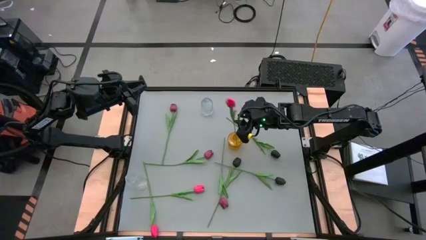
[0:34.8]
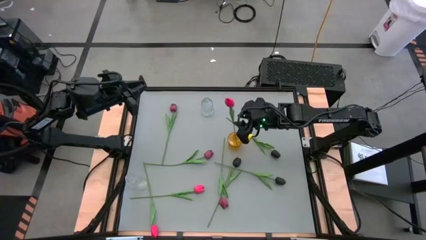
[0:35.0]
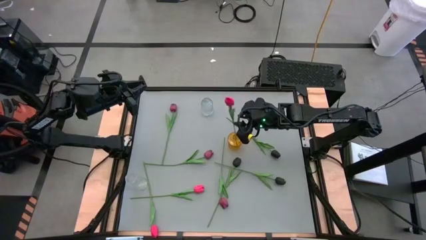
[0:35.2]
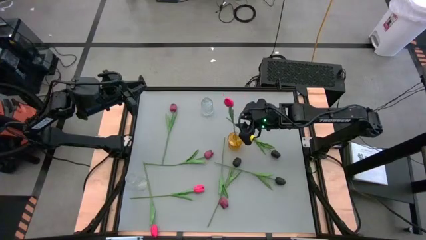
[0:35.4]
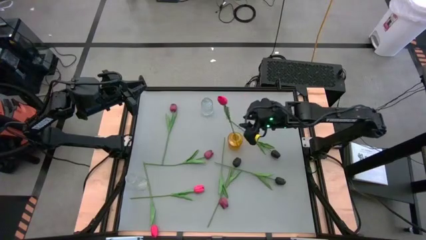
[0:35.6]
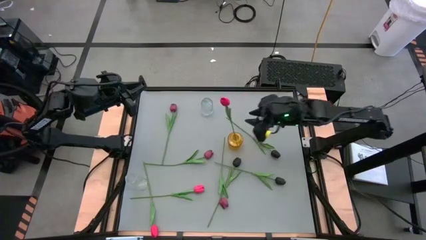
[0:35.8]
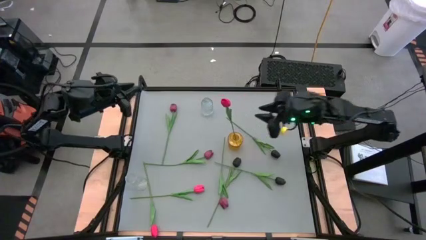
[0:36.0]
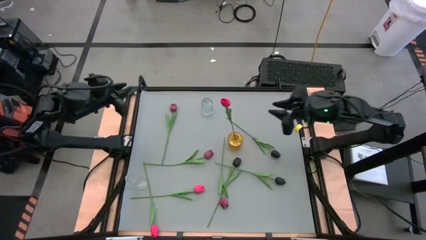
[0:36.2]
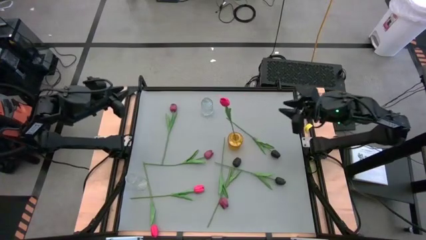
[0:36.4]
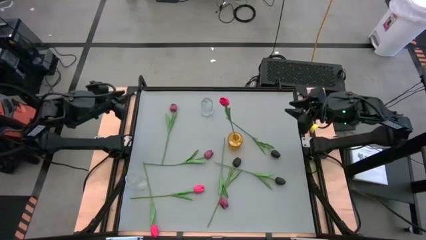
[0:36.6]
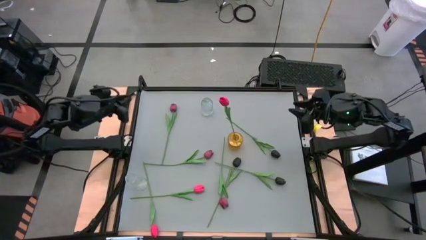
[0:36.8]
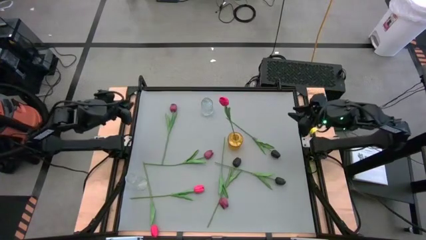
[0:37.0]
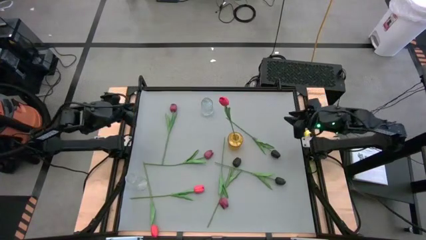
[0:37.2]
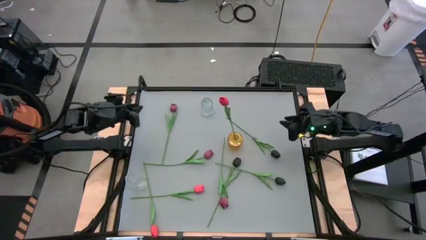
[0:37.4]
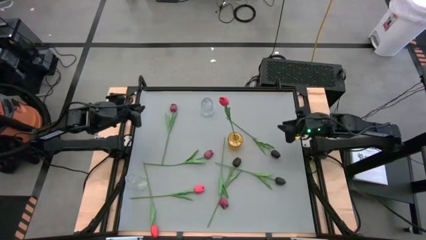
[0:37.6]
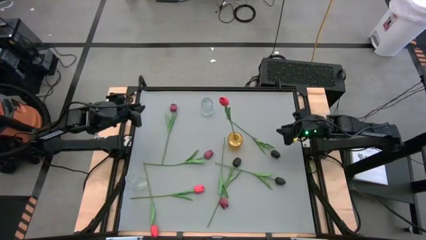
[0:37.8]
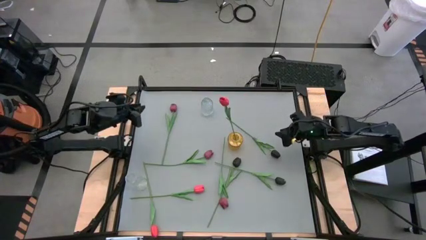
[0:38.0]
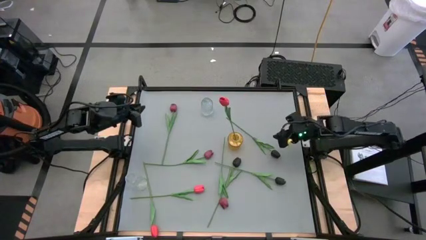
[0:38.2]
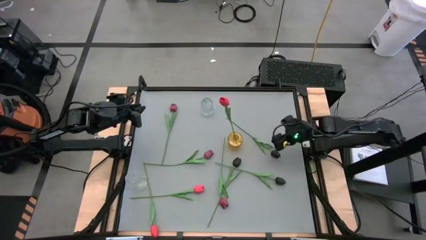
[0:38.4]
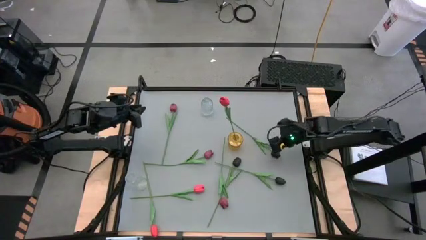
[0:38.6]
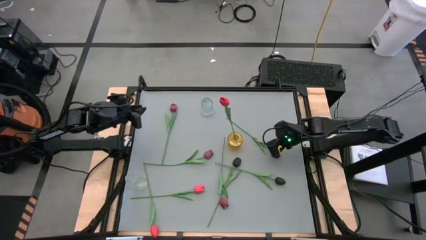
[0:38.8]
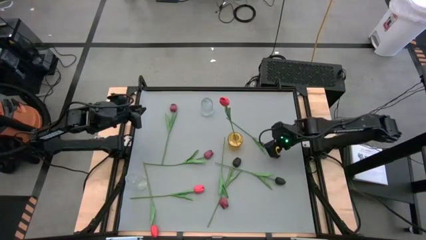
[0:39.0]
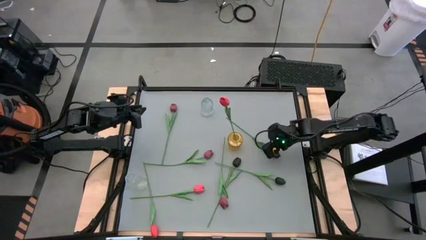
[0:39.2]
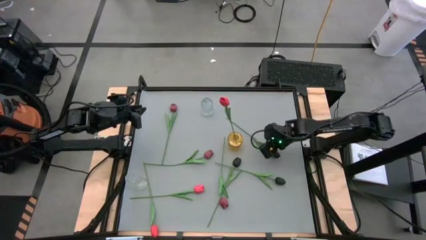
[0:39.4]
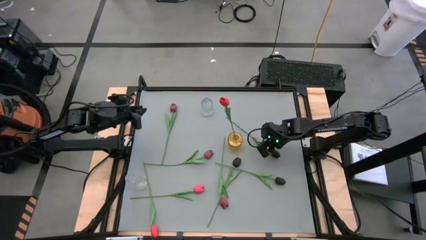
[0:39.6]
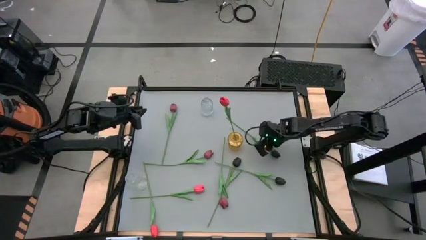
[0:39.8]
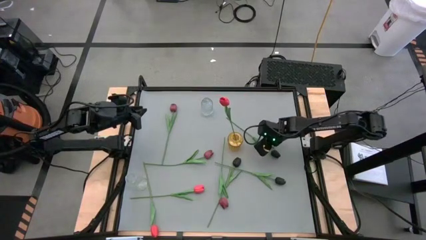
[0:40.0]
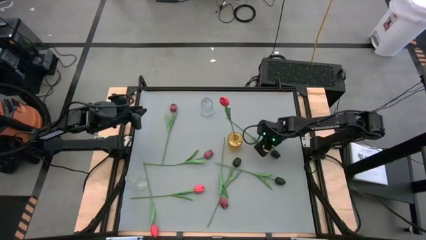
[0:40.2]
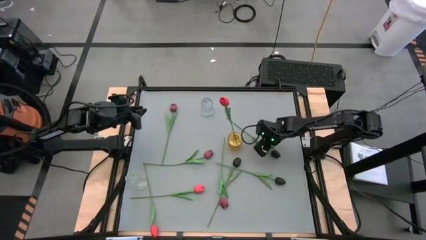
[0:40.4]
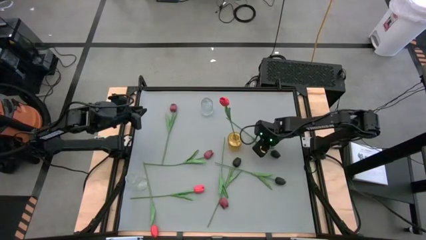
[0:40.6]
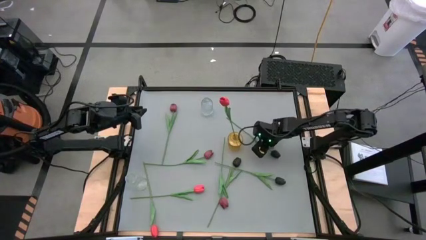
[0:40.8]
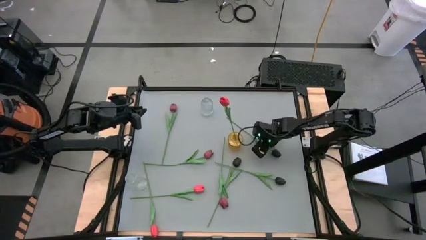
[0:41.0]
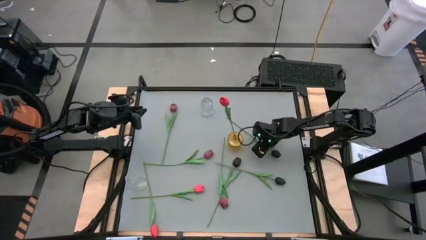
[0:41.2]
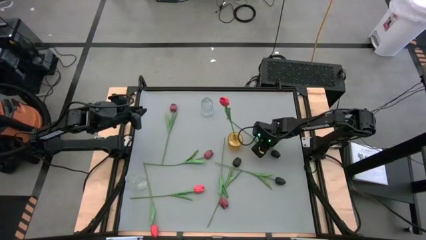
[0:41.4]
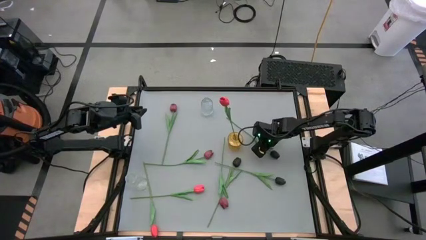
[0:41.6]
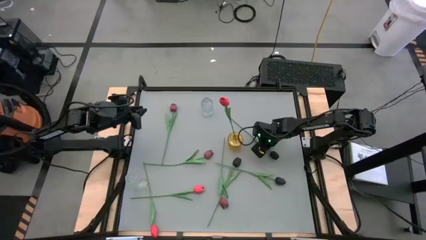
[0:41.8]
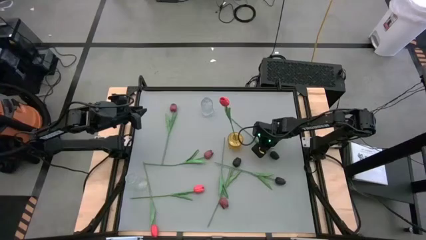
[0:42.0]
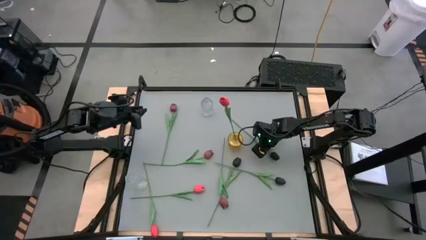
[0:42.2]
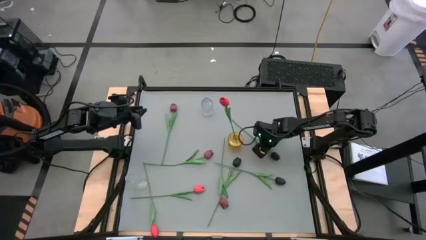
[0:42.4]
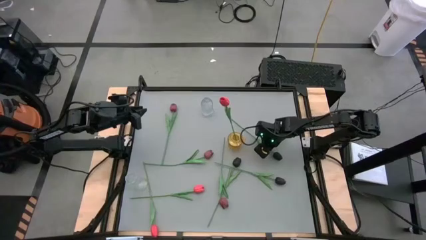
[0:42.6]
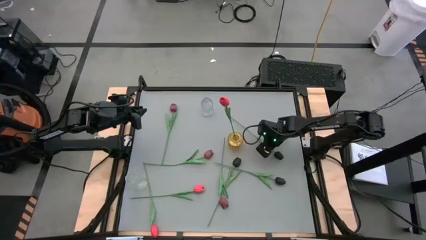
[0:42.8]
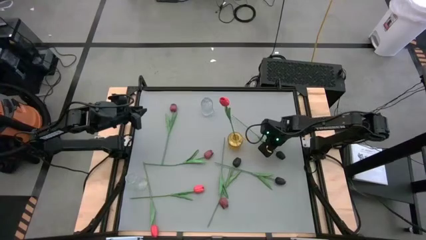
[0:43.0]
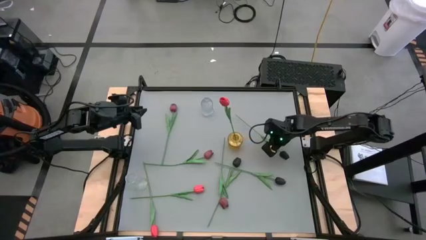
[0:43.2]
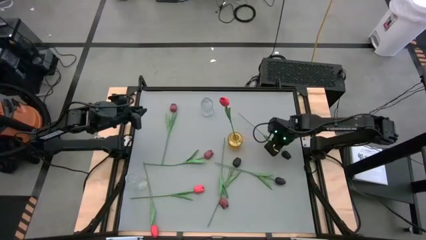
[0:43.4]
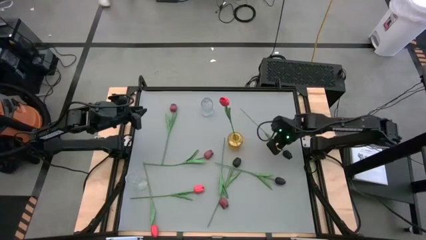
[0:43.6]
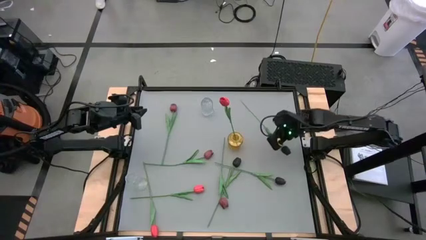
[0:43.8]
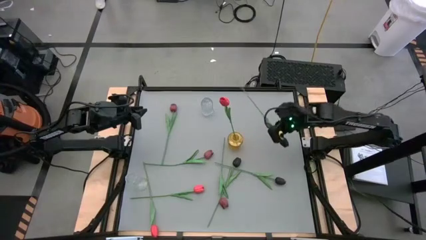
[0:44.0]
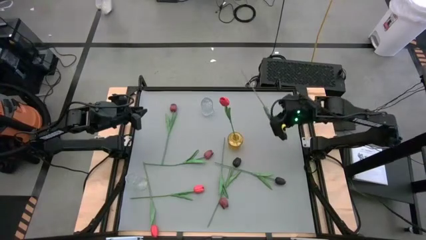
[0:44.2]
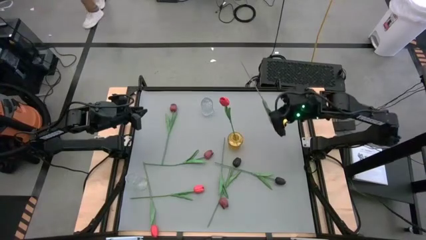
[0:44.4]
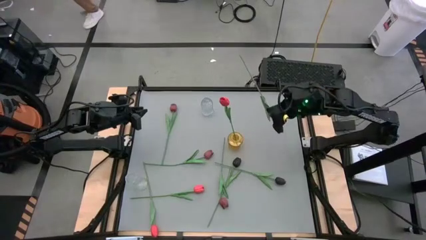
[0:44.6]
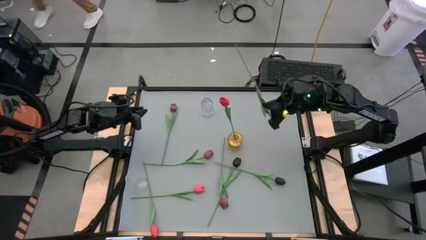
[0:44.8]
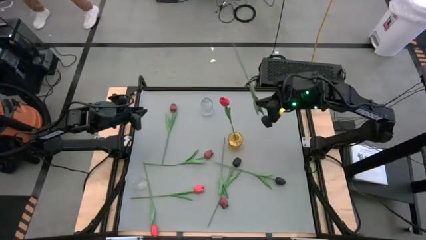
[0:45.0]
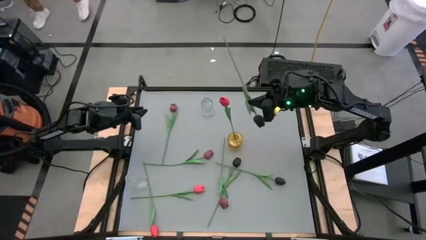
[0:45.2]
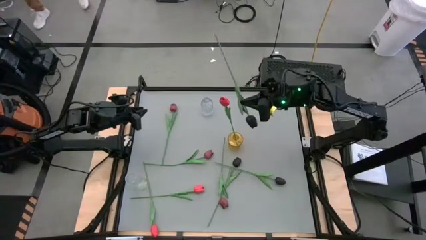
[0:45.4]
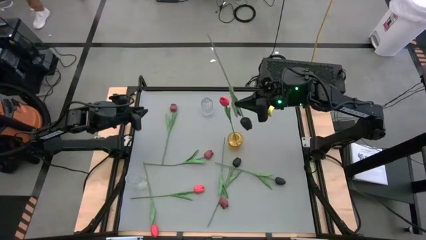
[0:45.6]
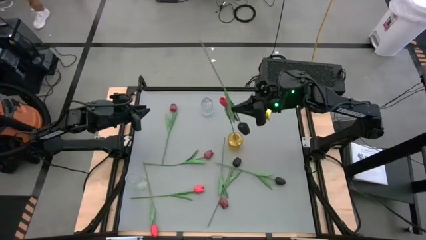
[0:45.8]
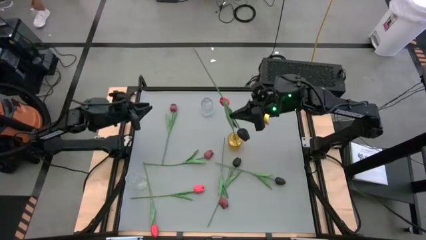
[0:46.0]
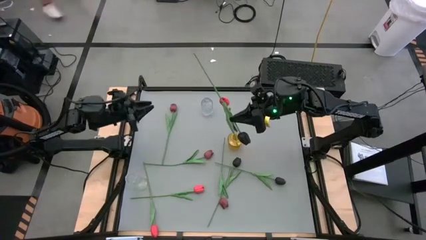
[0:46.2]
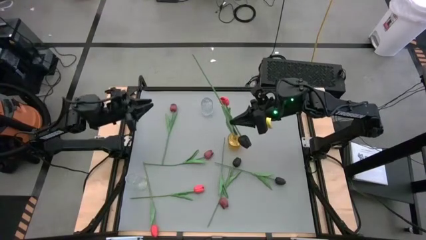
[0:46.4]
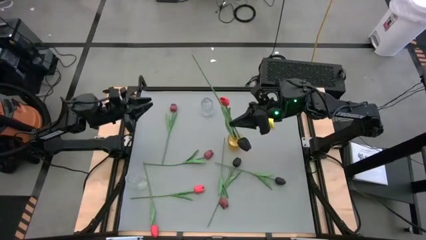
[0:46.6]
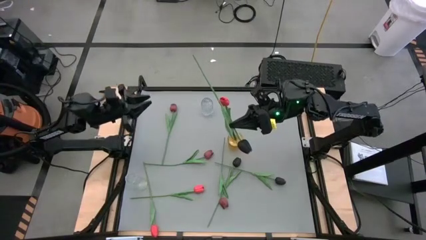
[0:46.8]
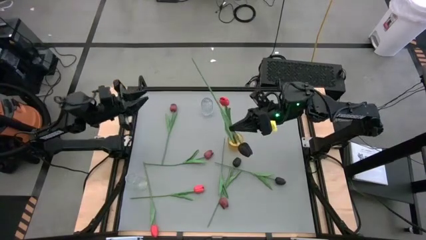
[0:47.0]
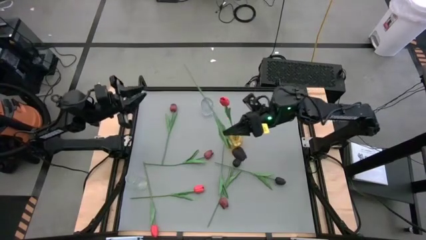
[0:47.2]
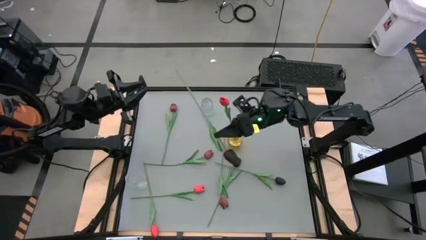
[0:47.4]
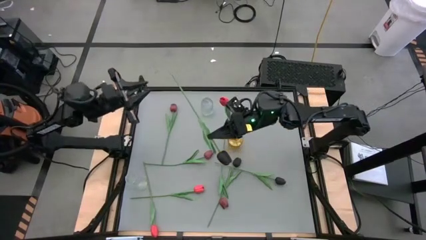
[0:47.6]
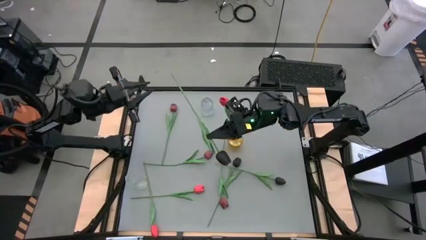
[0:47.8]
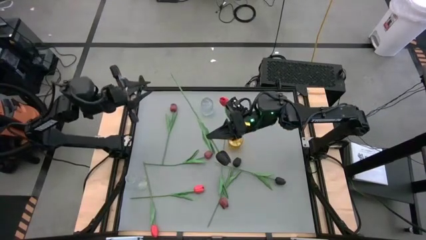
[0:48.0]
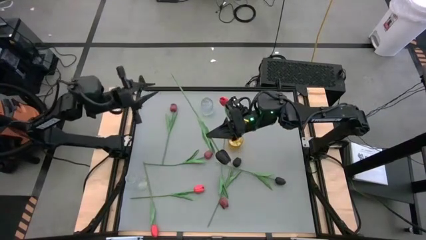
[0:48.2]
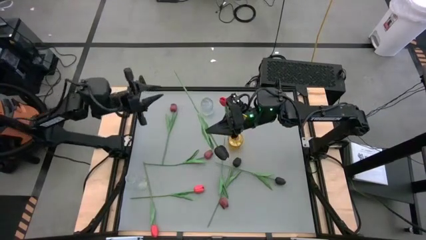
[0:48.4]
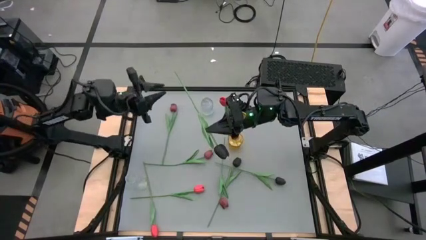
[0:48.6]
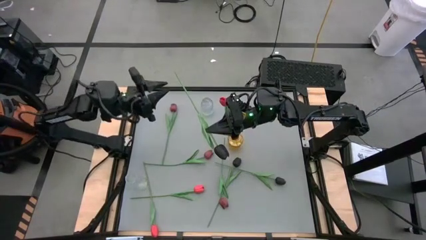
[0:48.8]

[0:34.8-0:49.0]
Task: Sort flowers into vase by color
Put the top black tulip into the top transparent vase

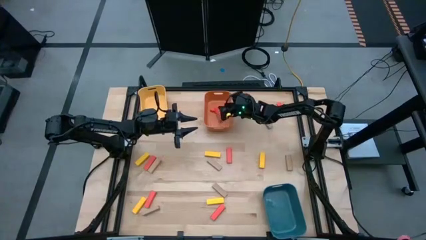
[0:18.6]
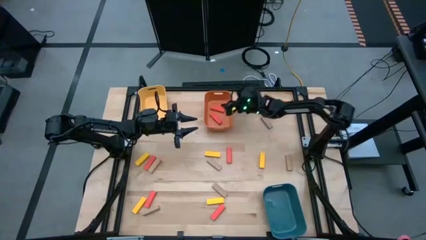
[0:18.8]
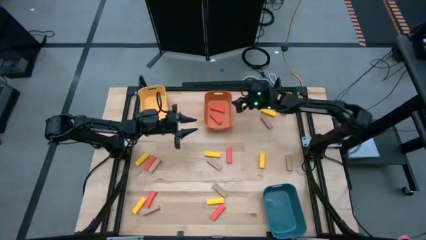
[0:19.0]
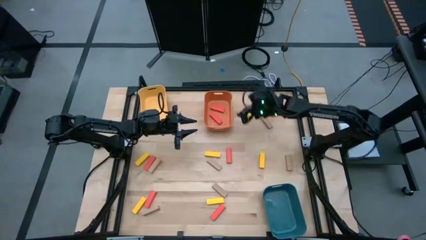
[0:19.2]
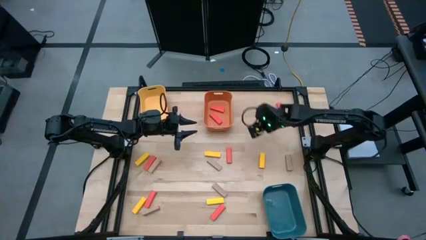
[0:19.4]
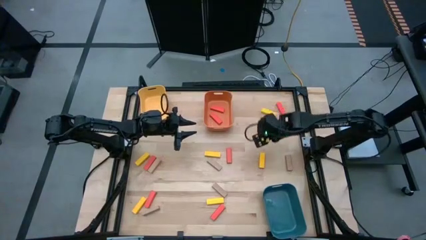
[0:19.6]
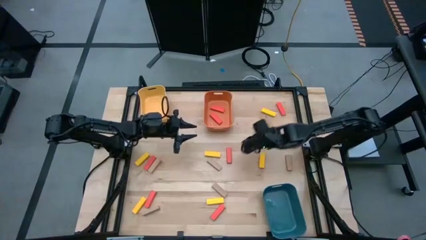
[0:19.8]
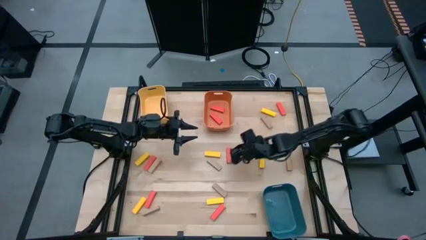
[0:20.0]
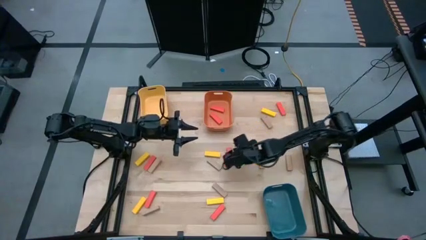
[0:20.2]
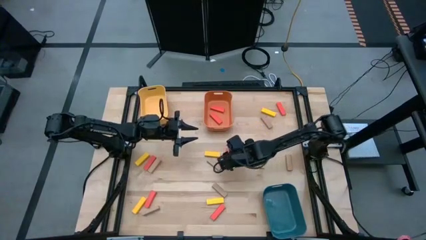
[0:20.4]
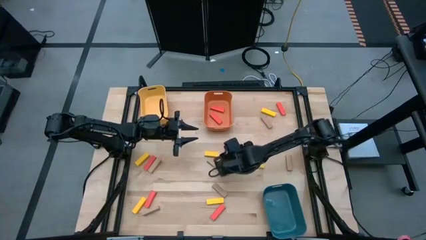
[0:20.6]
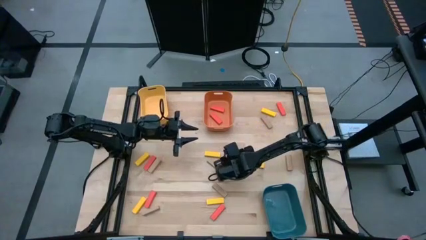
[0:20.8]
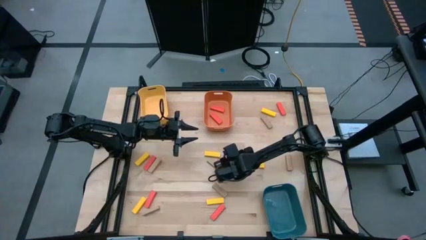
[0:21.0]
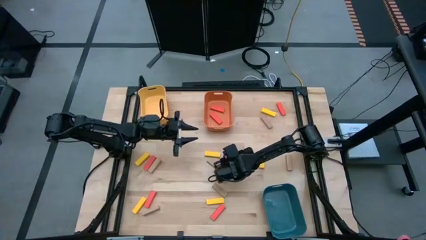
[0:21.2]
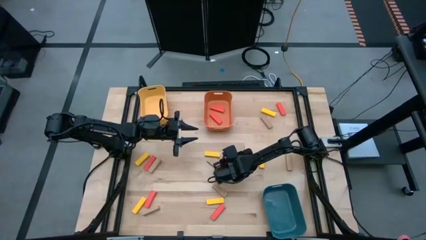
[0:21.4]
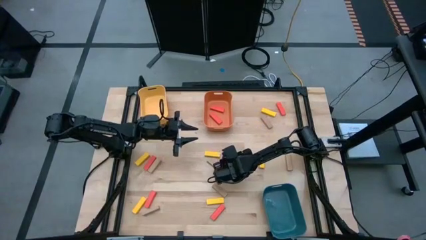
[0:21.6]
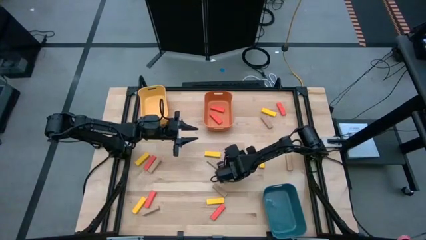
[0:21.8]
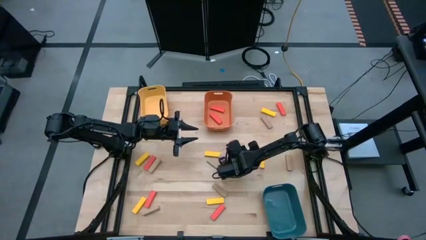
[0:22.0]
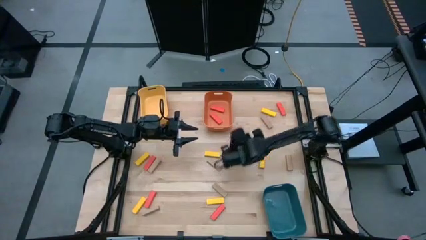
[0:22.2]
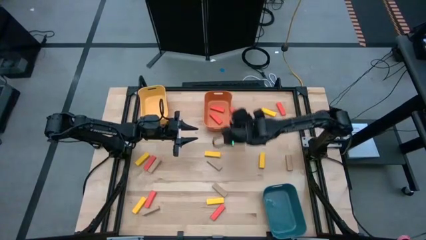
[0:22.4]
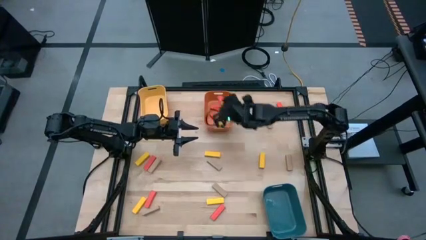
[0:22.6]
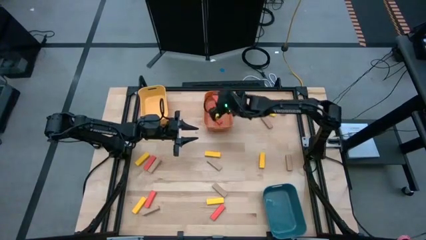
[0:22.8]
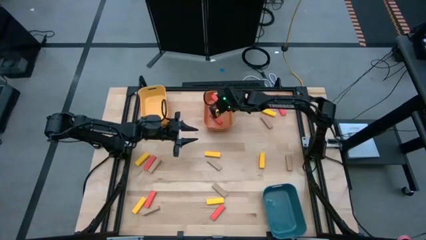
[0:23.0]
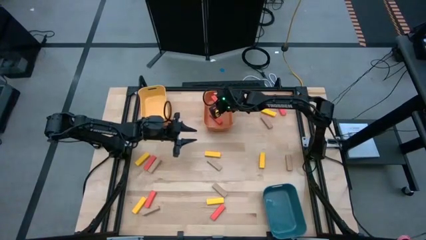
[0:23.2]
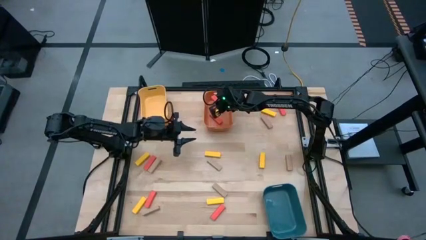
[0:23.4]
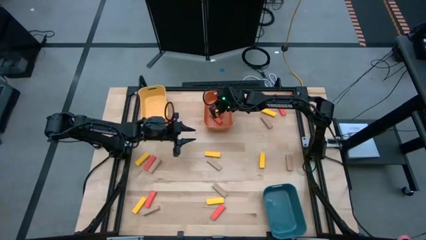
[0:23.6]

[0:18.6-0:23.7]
Task: Sort blocks
Put the orange block into the orange bin
